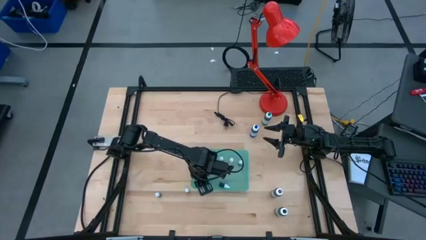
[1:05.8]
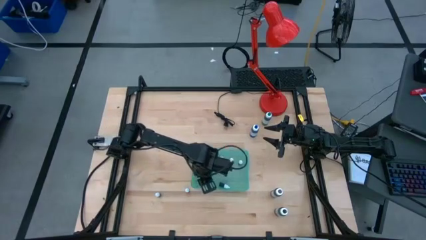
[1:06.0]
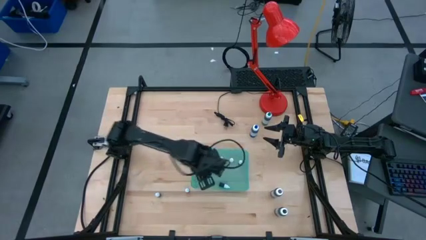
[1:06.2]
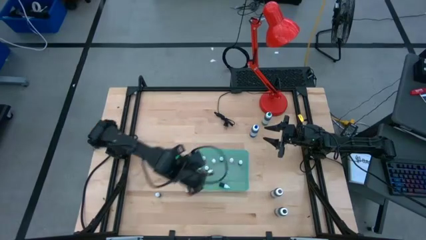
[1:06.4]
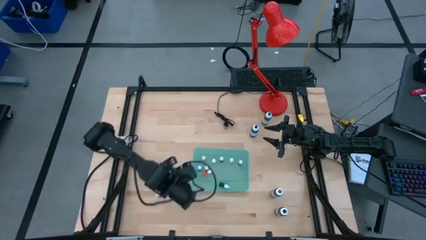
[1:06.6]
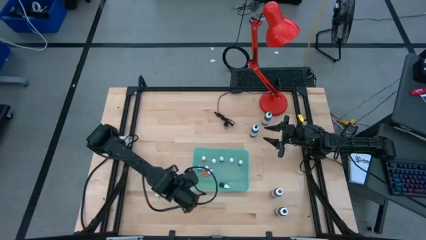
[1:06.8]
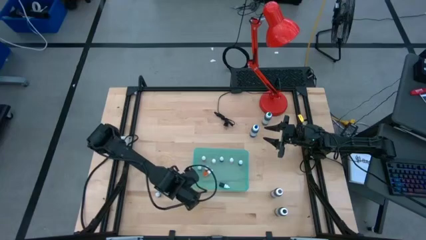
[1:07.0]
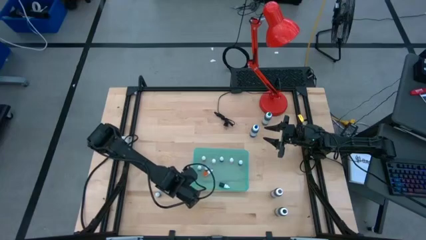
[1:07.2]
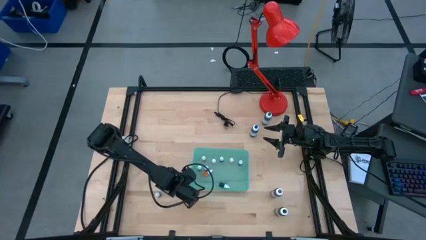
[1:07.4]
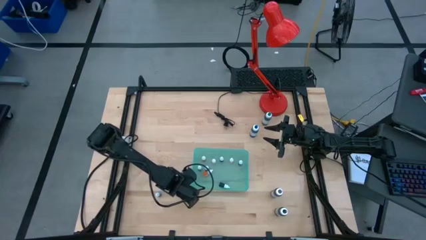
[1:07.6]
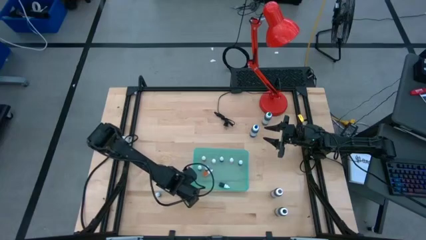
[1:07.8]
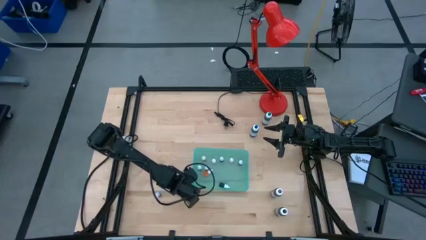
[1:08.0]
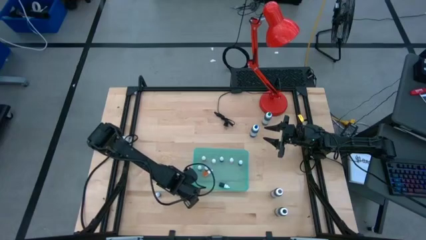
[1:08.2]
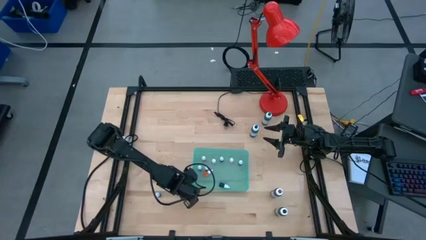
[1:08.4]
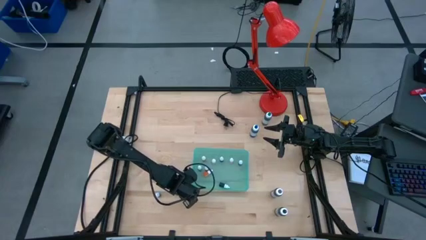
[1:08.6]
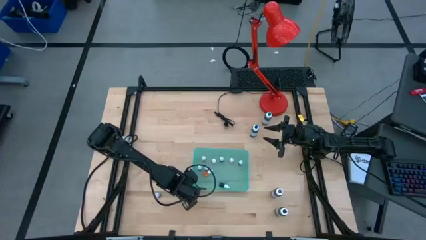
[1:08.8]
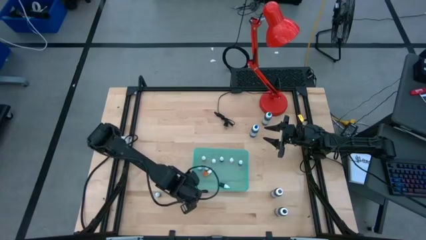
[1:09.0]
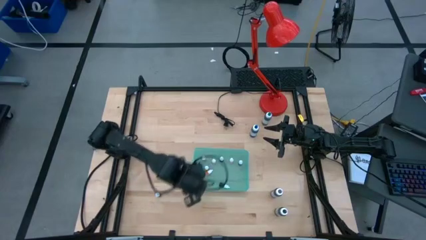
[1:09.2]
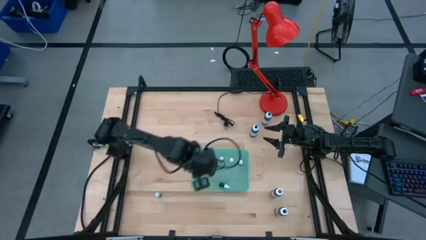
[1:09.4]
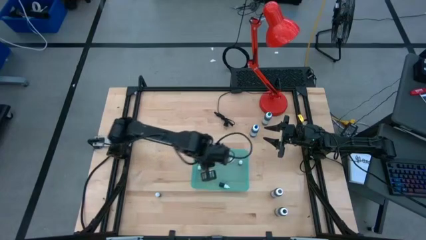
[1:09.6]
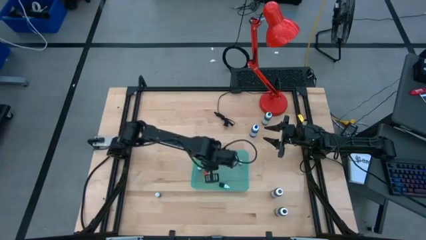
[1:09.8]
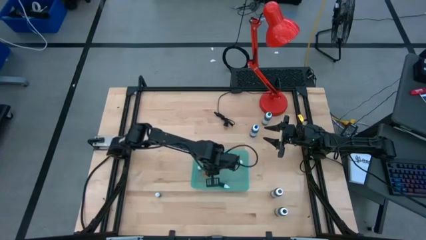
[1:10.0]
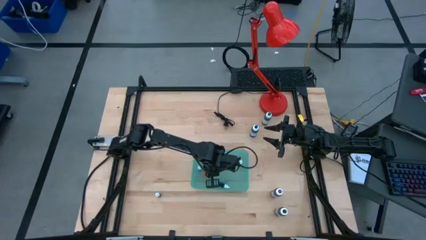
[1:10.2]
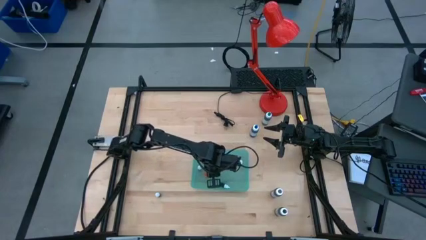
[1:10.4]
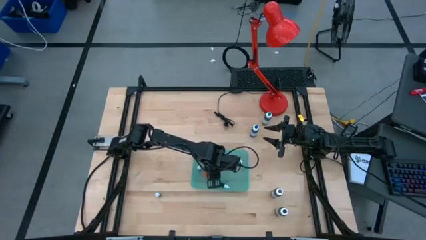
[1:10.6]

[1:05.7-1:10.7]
Task: Pick & Place food coloring
Put the small white food coloring bottle into the light blue bin

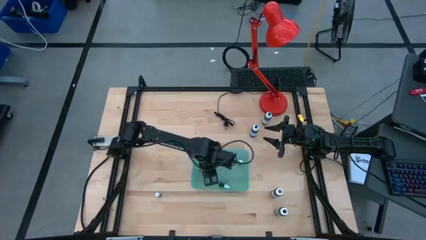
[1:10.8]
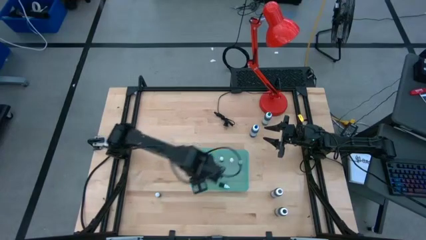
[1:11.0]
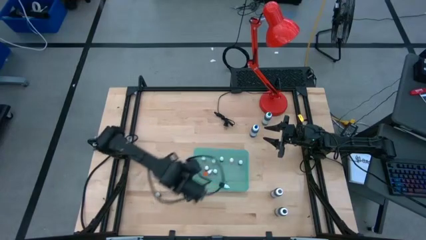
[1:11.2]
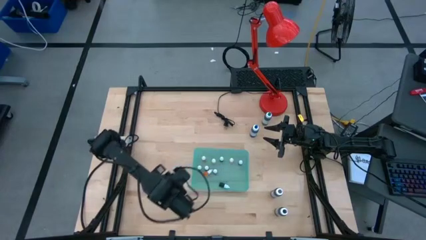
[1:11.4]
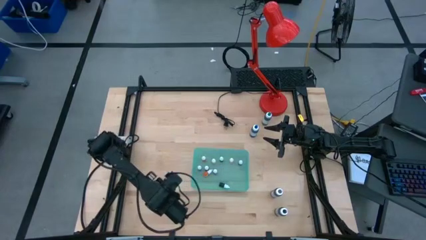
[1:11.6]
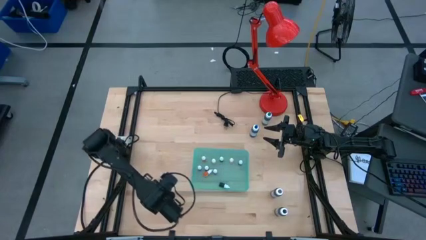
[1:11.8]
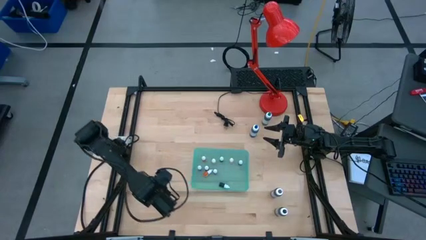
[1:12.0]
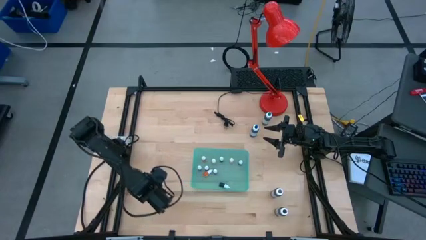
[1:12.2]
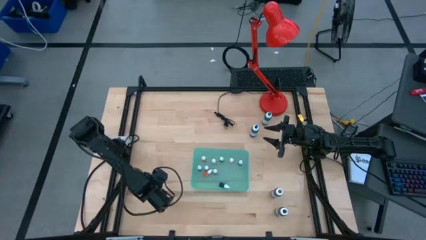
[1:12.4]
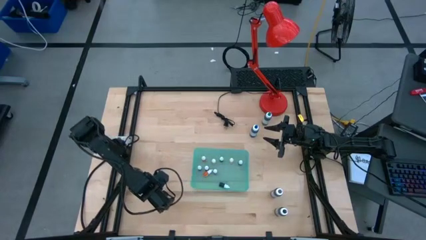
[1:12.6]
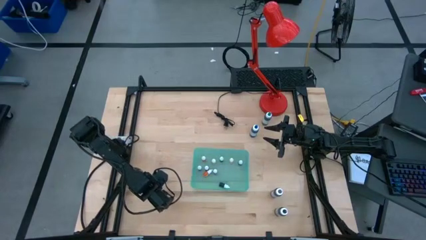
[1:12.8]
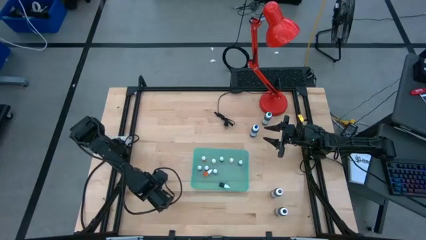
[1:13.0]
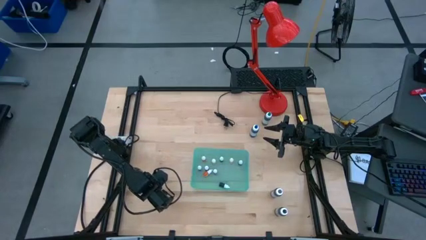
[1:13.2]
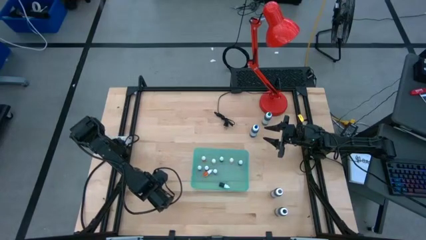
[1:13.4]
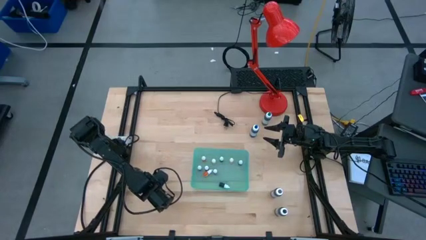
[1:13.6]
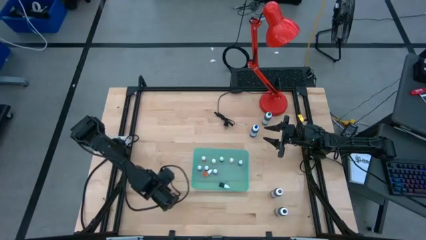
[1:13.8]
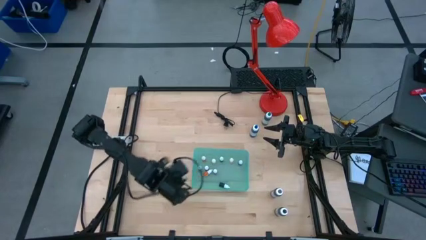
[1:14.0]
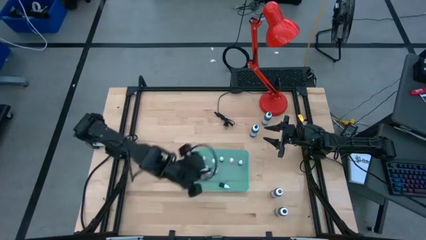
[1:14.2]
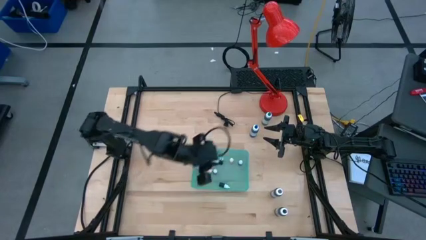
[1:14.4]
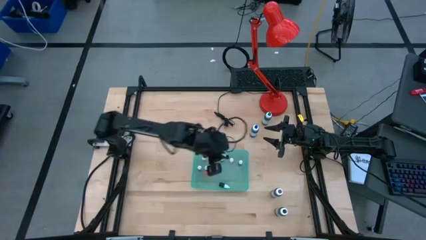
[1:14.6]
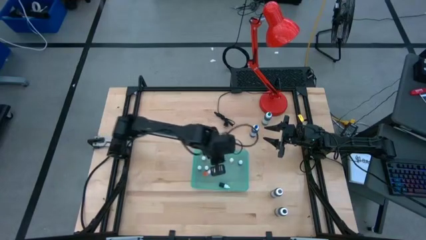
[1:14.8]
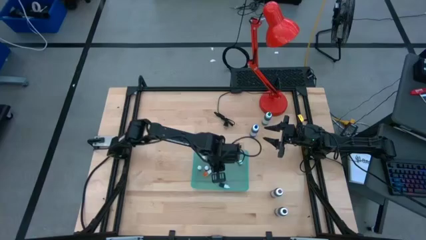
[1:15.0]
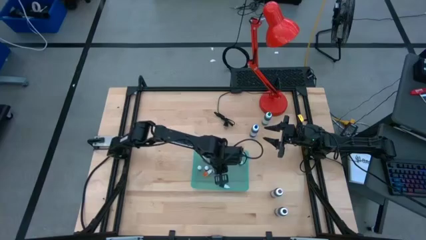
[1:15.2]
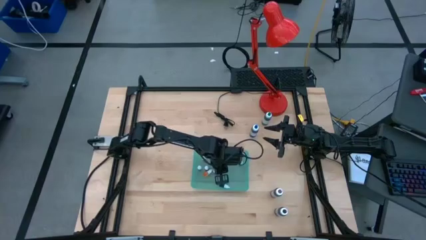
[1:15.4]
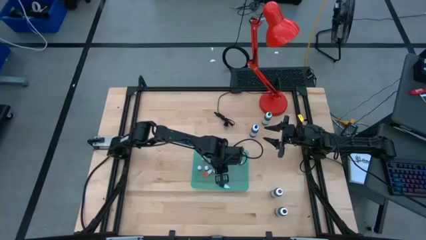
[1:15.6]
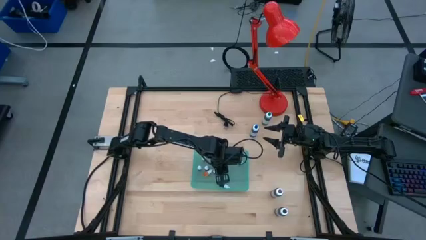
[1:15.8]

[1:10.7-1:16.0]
Put the small blue food coloring bottle into the light blue bin

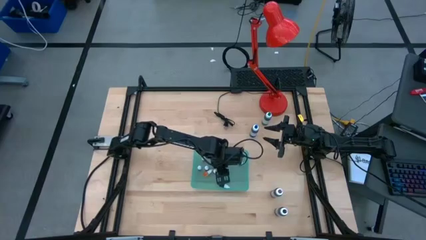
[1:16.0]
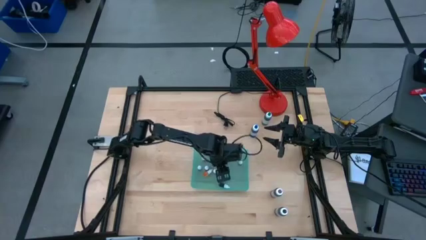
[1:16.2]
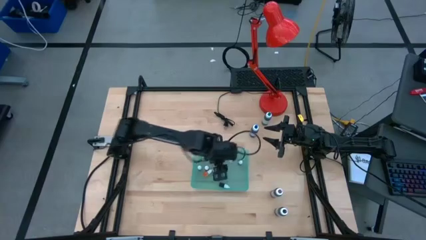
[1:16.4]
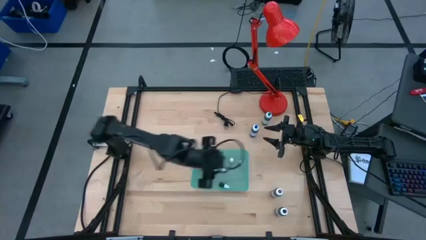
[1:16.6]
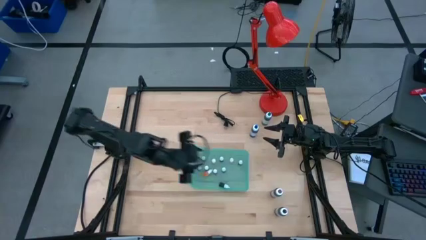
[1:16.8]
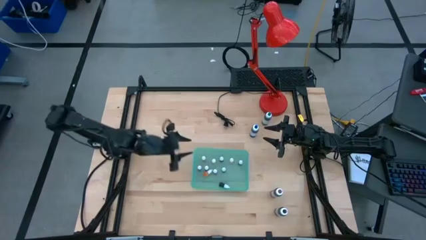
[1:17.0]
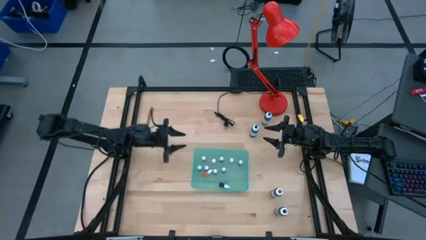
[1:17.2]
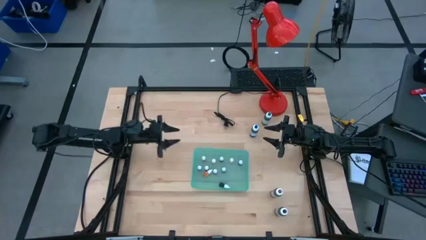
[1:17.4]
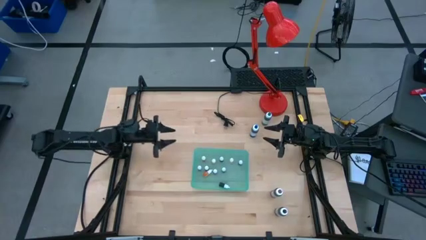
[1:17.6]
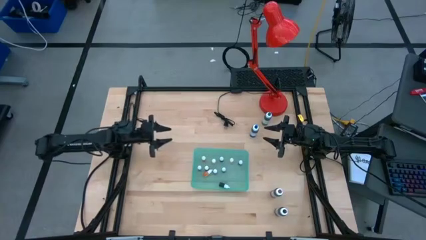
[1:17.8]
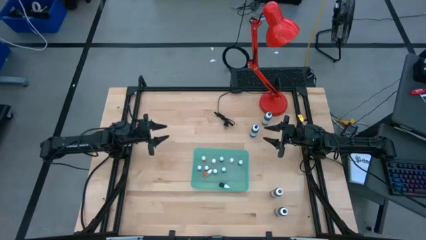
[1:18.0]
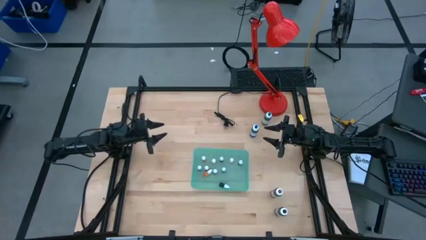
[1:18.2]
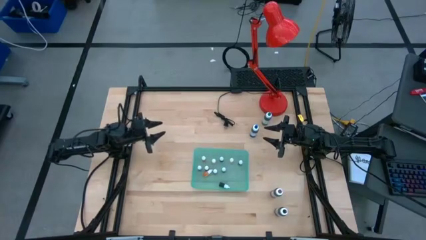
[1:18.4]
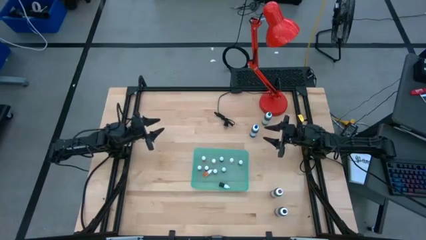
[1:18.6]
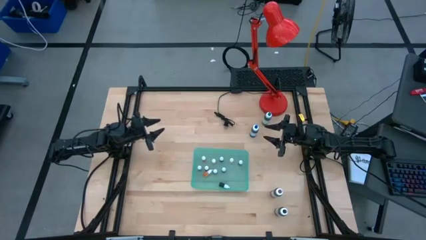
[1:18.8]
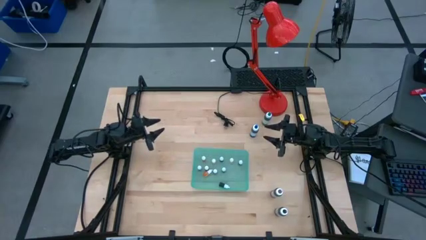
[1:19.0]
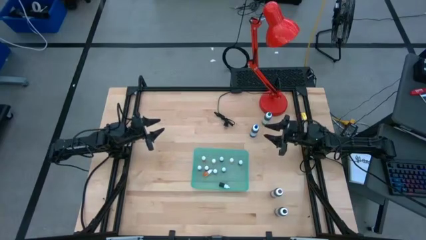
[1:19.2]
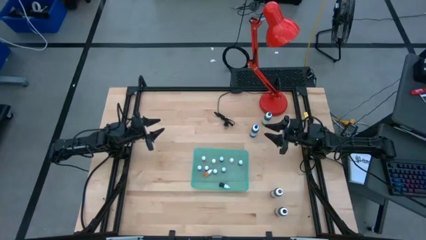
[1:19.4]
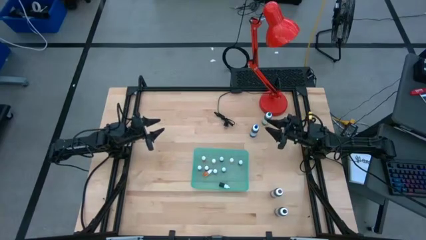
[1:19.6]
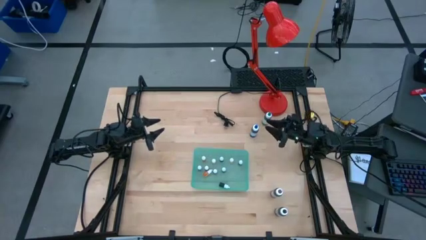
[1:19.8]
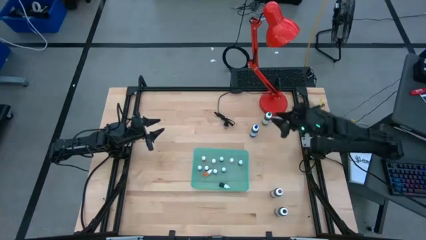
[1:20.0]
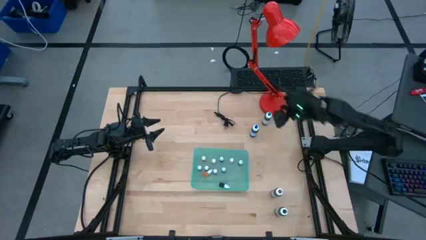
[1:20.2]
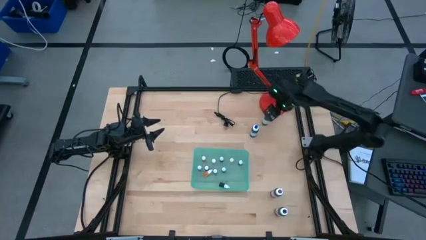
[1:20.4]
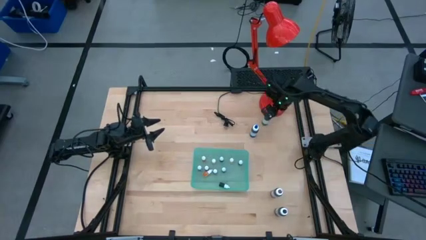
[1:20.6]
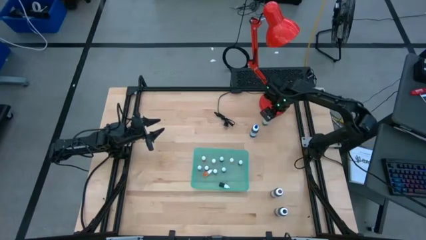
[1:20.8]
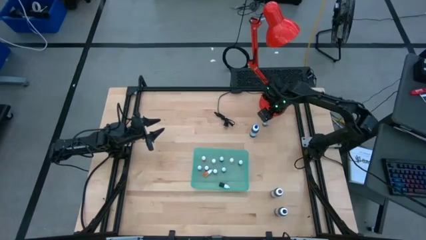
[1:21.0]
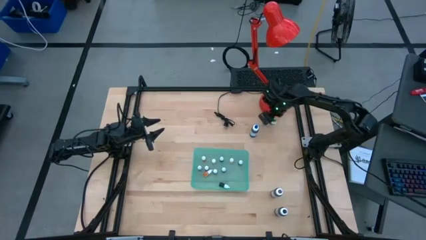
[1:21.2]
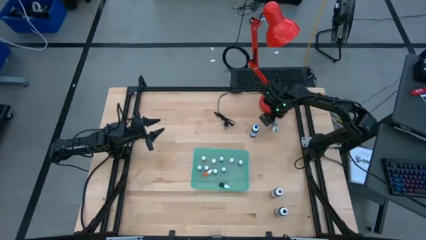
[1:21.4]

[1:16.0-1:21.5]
Put the big green food coloring bottle into the light blue bin

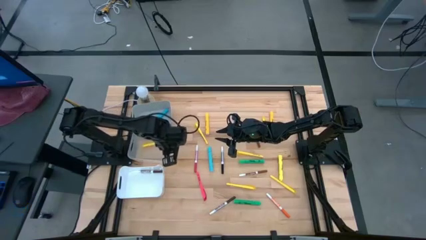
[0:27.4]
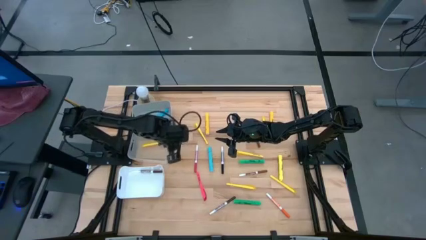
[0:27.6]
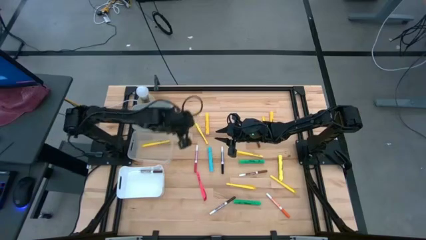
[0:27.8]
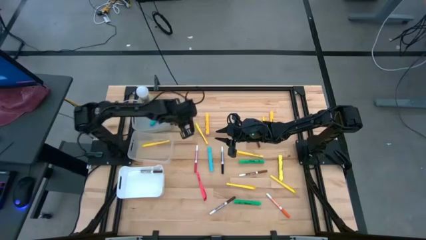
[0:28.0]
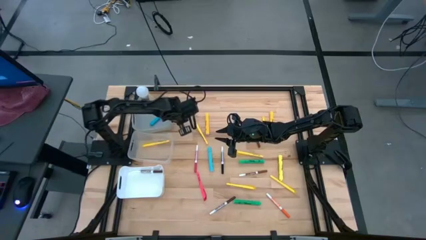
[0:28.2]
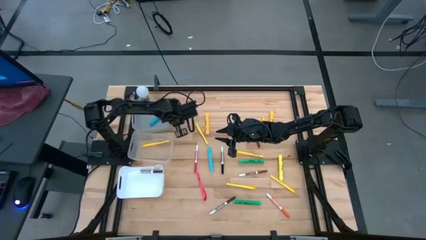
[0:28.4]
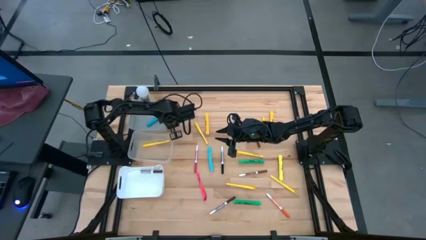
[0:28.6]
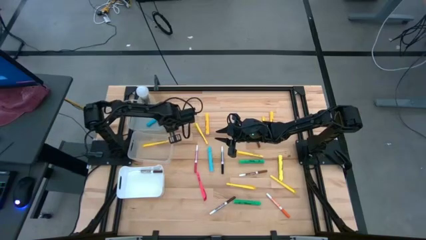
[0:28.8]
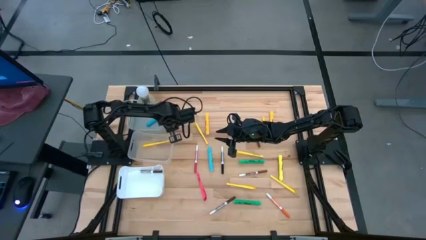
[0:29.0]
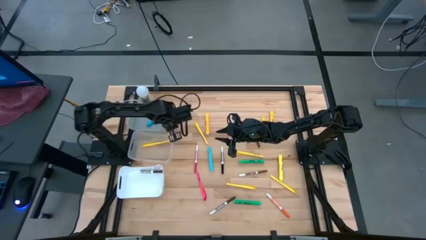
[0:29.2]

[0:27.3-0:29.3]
Task: Pick & Place Markers
Adjust the gray bin
